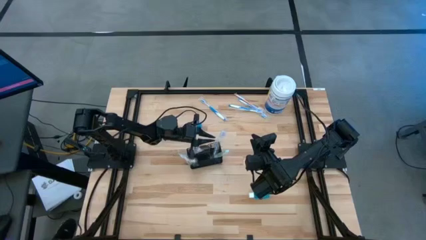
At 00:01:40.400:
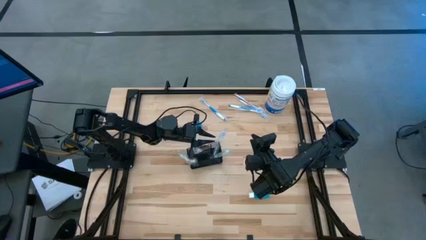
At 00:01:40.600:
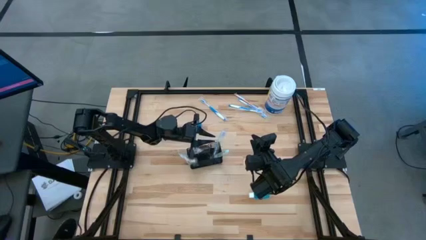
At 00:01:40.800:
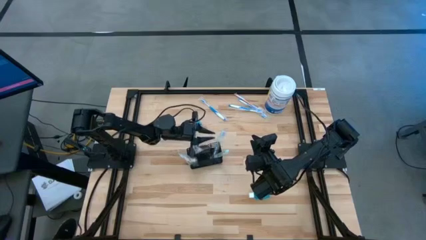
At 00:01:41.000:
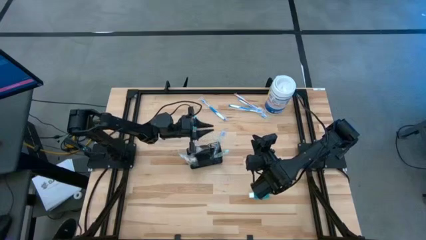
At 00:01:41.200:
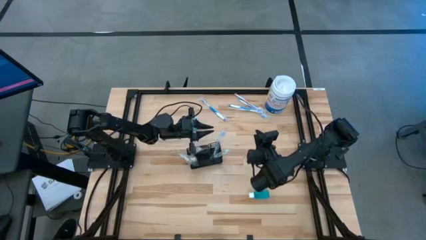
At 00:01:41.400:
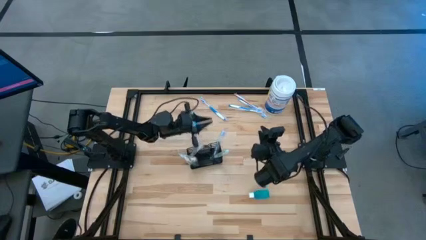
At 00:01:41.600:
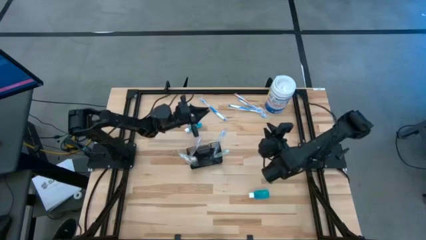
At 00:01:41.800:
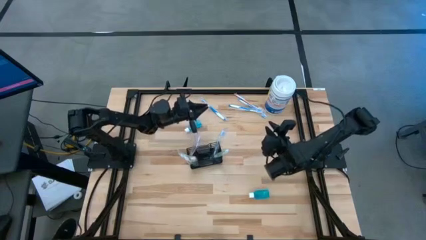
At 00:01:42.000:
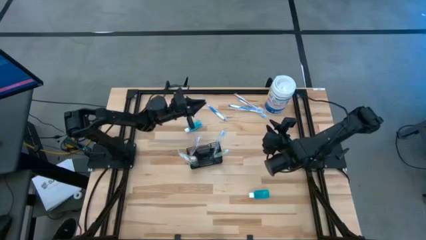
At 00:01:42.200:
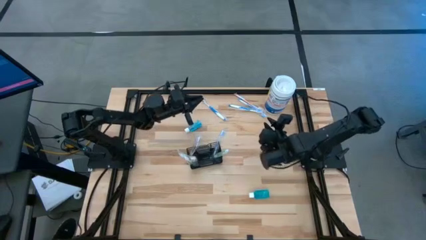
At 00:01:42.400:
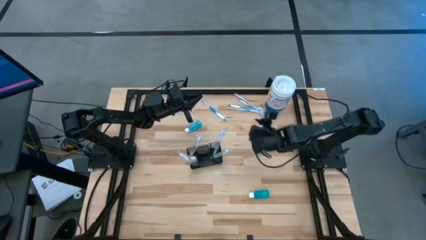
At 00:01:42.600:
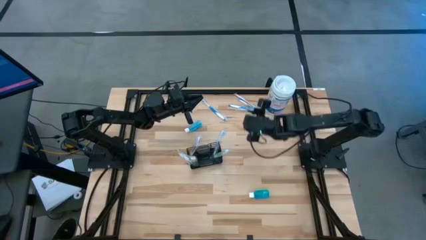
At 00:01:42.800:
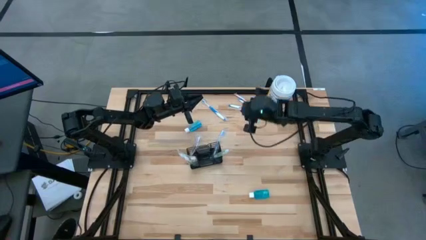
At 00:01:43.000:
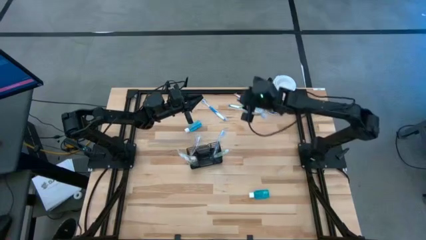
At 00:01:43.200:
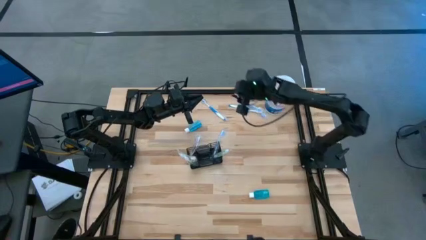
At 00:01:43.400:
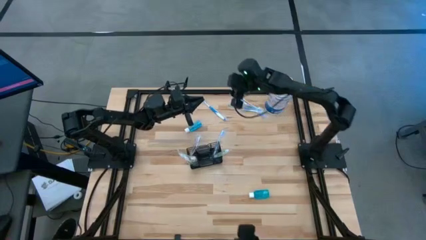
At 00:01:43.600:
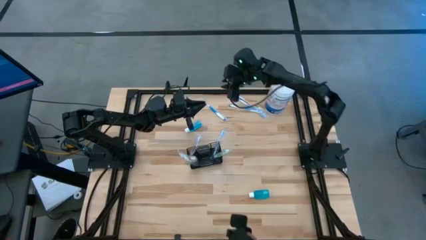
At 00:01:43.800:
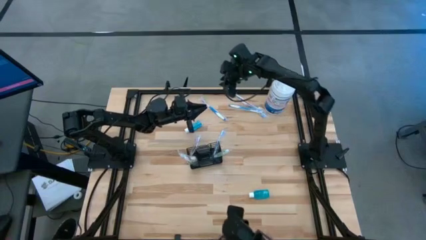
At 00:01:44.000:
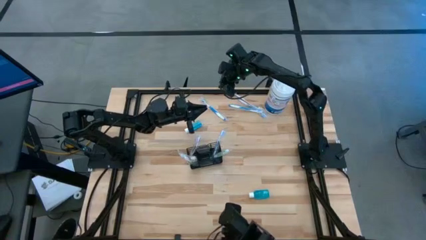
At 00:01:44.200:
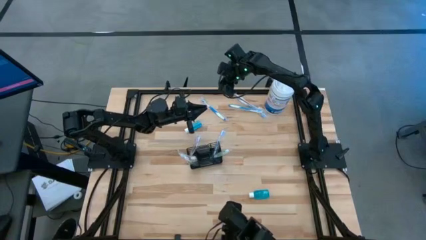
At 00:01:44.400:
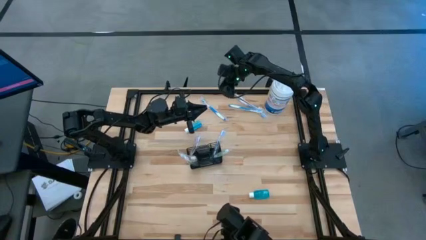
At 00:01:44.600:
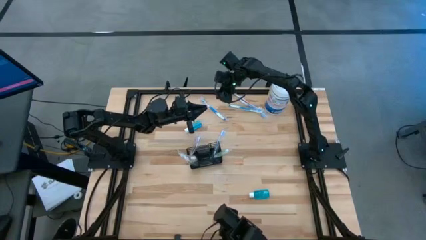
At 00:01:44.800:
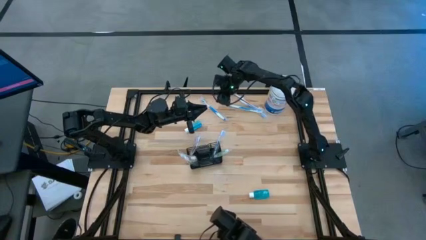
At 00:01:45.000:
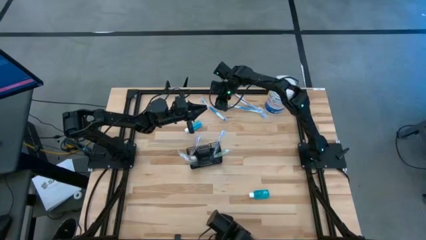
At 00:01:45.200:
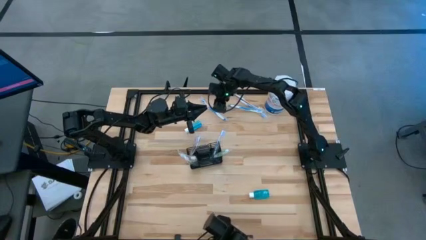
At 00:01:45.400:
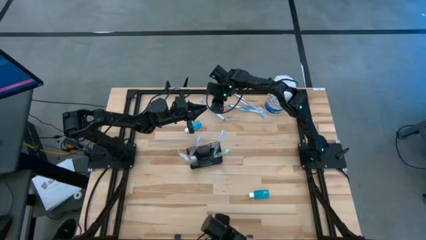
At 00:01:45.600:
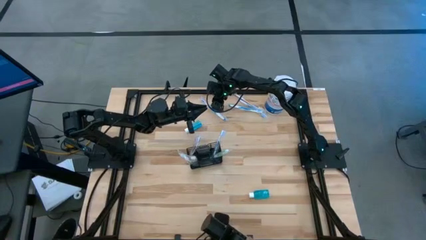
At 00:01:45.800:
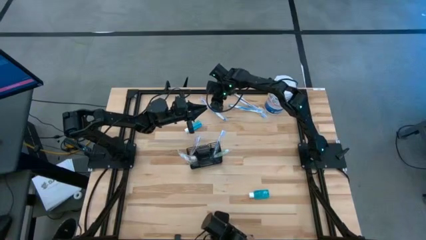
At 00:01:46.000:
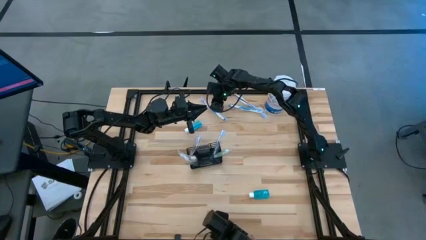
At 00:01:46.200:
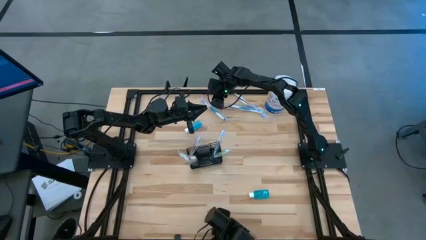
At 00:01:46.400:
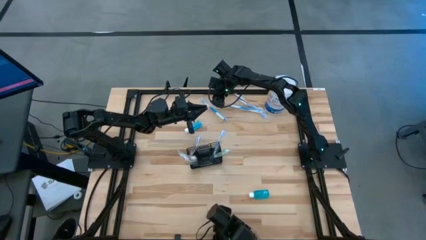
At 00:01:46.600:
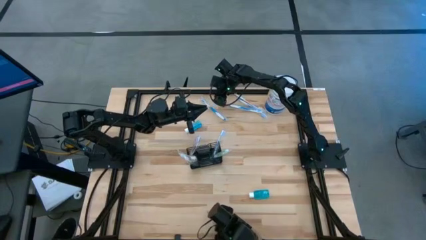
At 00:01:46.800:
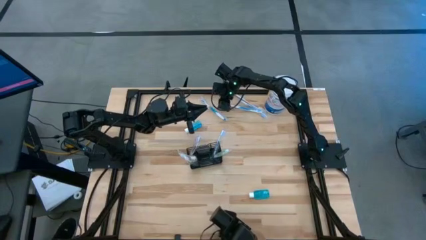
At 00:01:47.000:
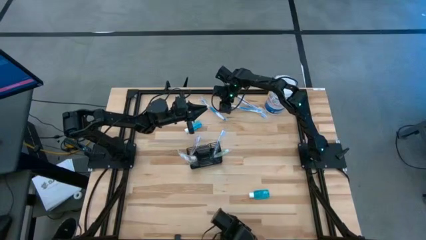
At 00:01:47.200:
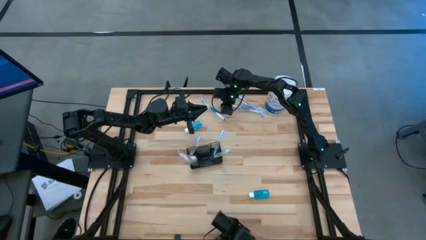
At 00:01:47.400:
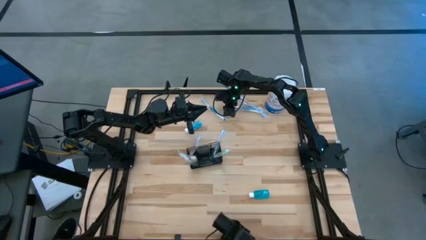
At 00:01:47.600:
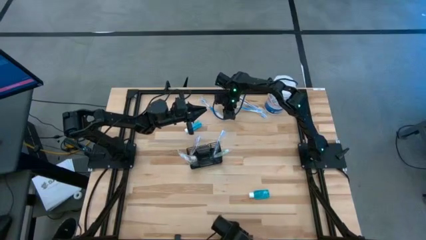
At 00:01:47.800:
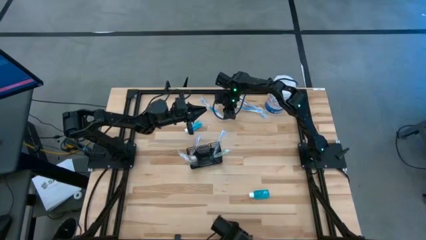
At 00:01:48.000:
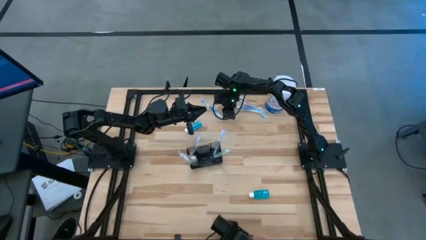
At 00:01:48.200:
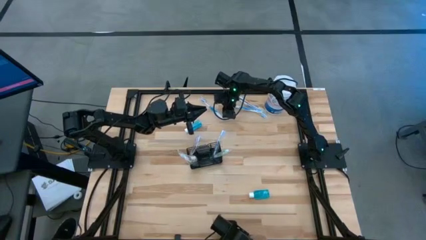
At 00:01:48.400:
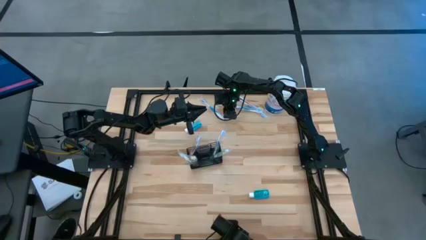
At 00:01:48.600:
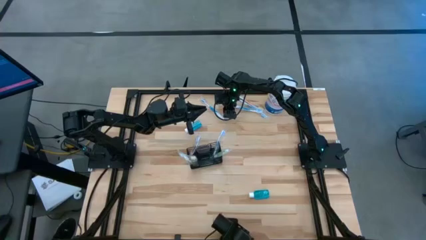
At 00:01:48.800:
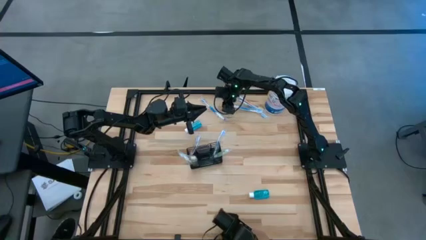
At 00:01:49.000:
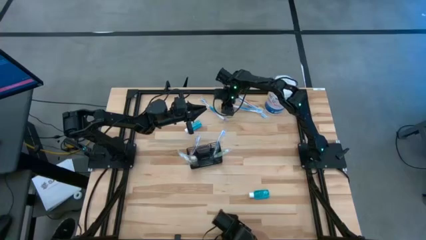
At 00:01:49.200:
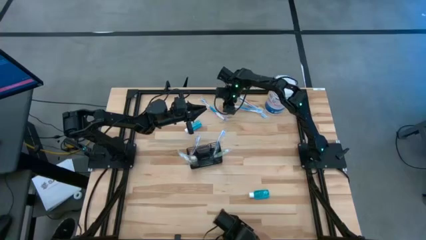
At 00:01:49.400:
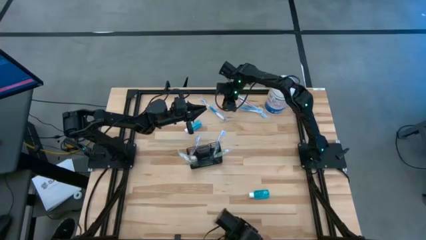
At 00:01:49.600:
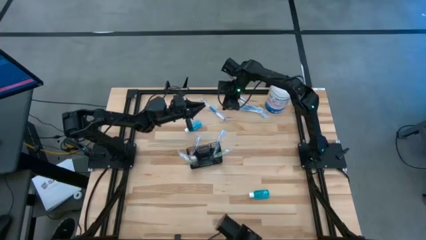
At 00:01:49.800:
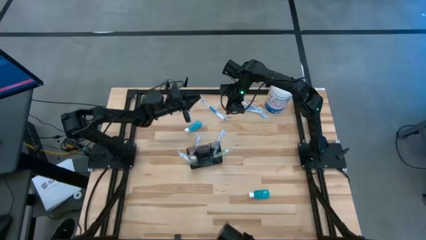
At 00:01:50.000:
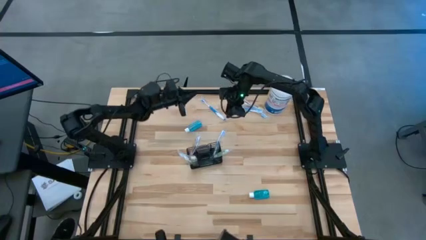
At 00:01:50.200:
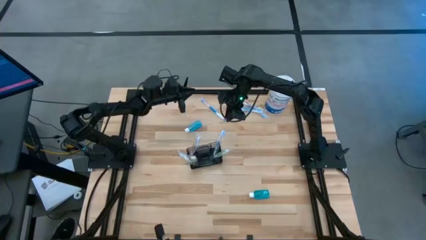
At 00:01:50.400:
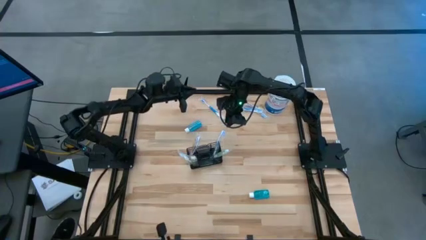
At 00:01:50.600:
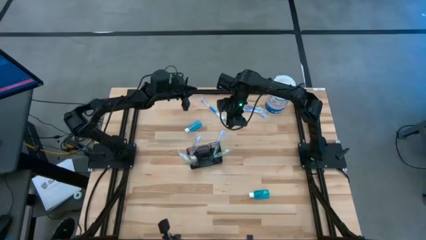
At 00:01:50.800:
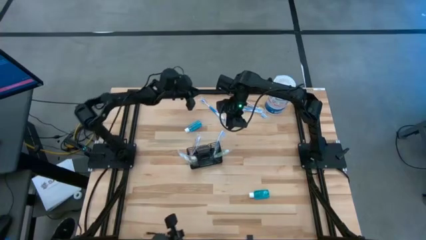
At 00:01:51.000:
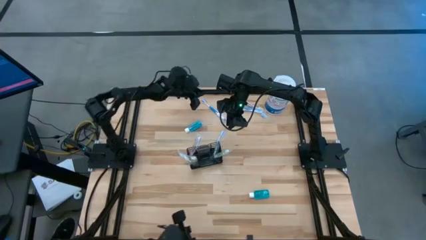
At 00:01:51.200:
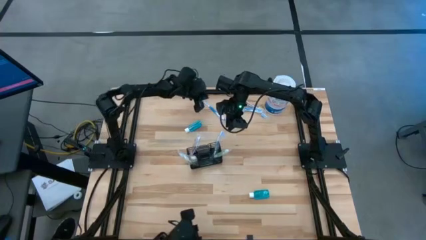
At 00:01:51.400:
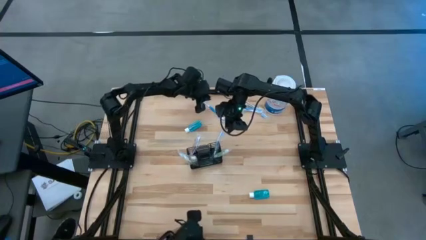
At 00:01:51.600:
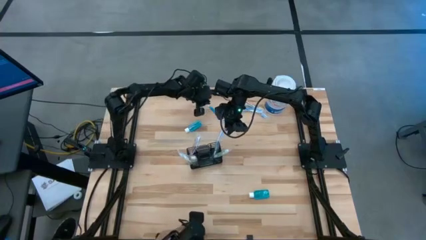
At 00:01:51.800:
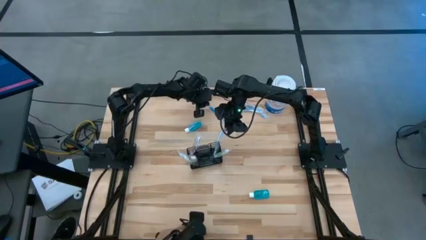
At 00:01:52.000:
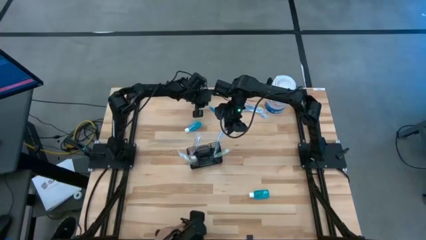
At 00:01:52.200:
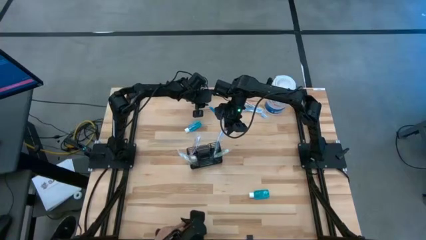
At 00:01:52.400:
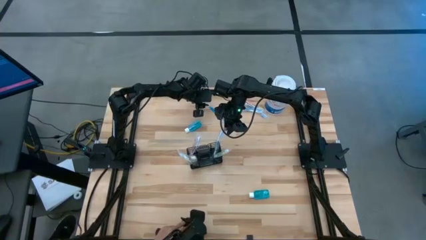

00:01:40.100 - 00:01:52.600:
Task: Pick & Place toothbrushing station
Put the blue toothbrush into the wire organizer

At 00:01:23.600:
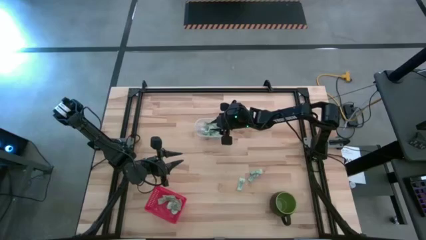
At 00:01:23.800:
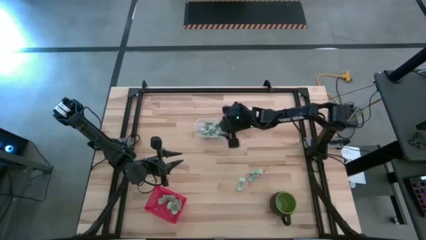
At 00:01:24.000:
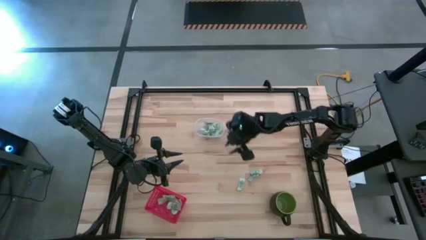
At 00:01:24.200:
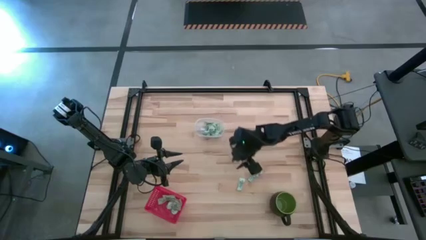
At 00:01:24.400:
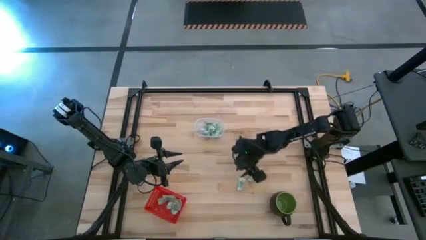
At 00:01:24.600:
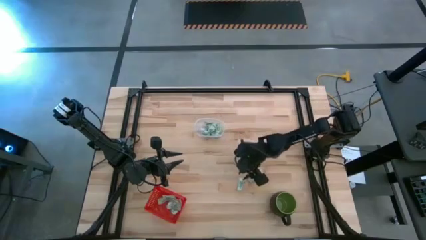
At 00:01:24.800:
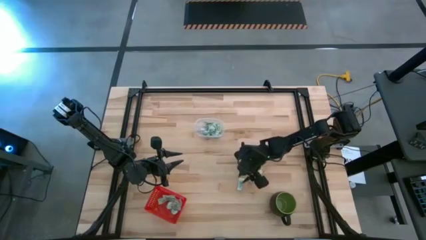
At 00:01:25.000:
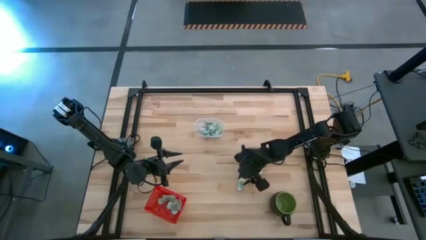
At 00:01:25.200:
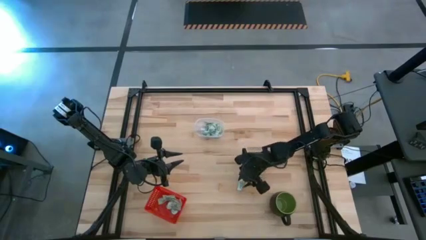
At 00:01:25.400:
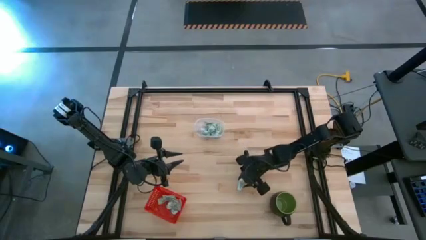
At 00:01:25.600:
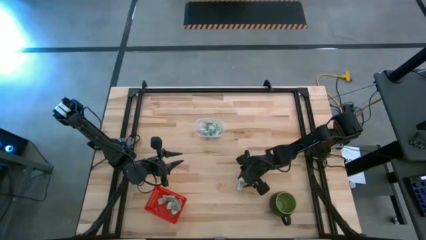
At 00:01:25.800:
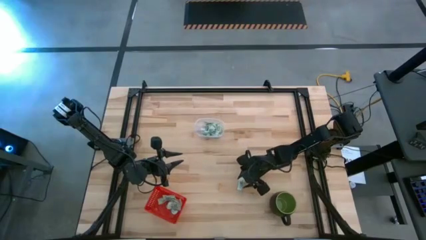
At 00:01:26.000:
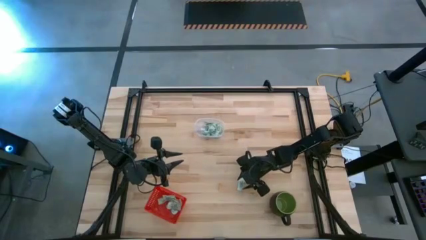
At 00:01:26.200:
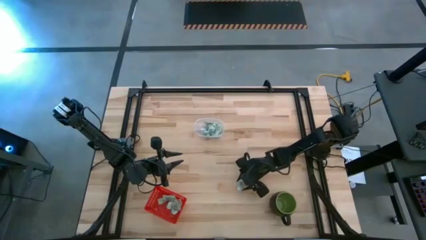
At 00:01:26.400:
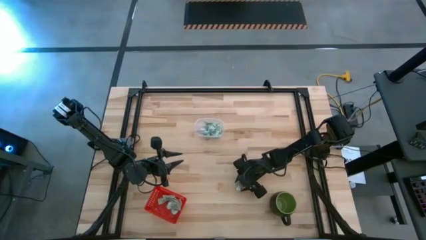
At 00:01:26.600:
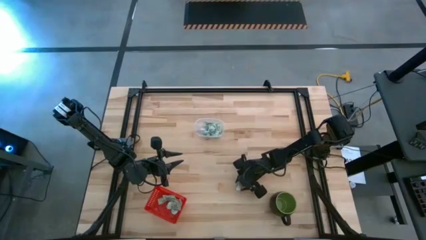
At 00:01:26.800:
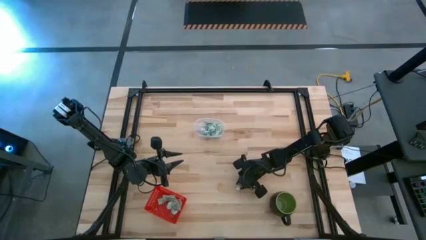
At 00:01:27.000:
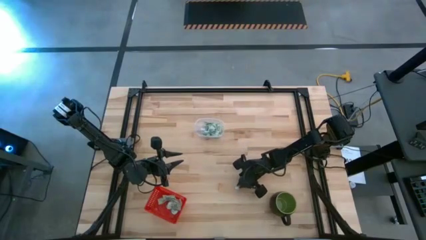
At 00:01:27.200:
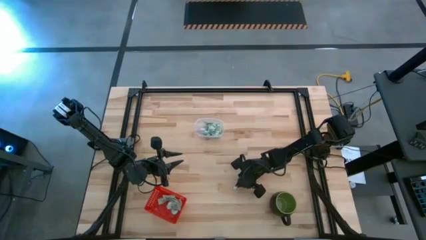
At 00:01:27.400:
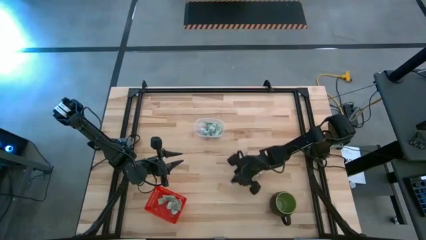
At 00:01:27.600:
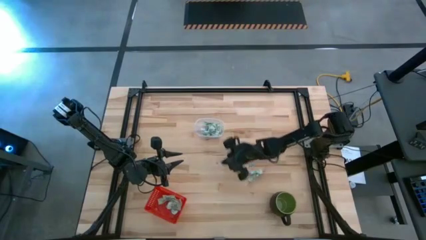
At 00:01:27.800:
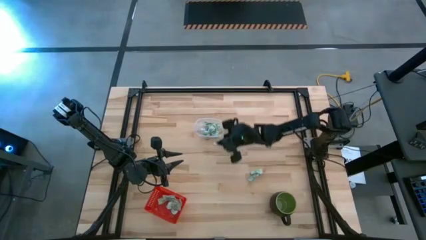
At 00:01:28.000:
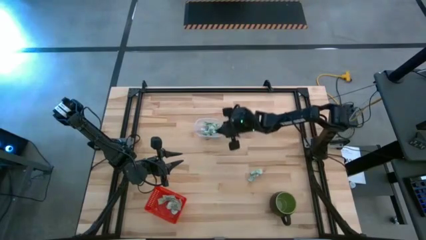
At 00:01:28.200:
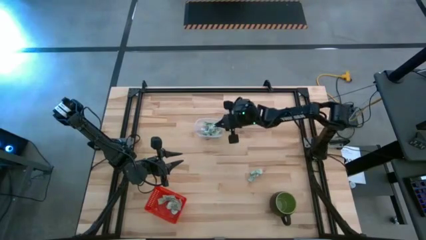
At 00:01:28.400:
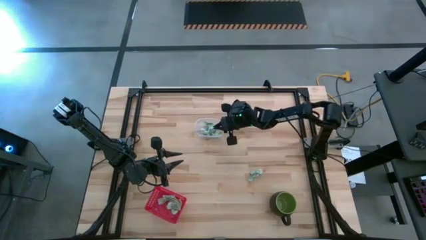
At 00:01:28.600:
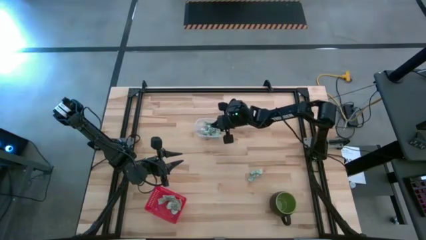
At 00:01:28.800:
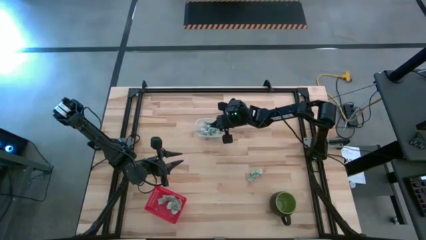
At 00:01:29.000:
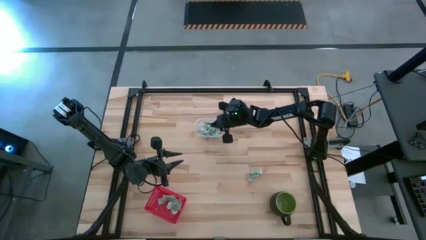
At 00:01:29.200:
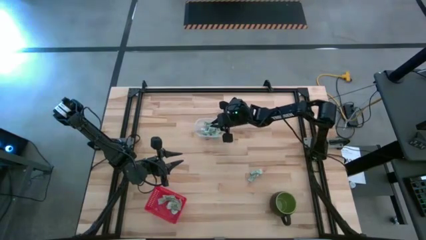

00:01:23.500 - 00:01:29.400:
Task: Pick and place items into bin
Put the stevia packet into the transparent bin
